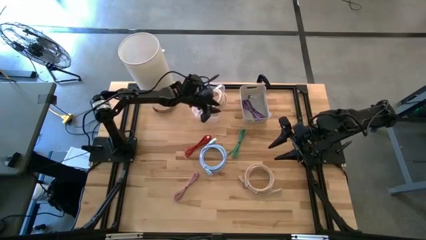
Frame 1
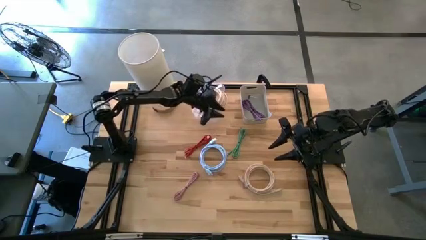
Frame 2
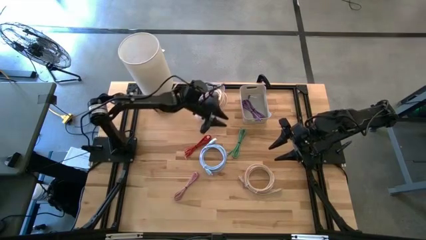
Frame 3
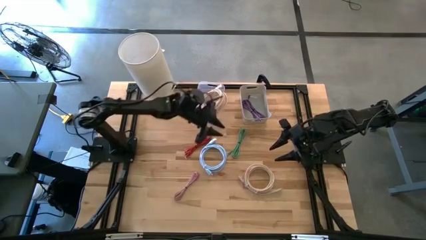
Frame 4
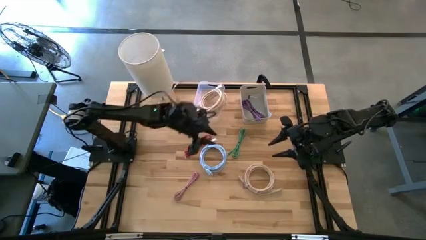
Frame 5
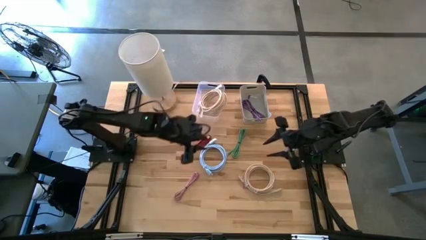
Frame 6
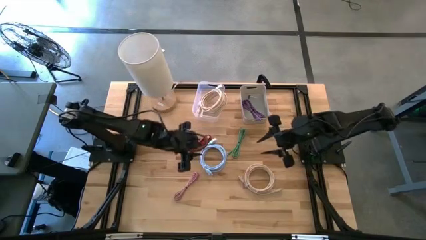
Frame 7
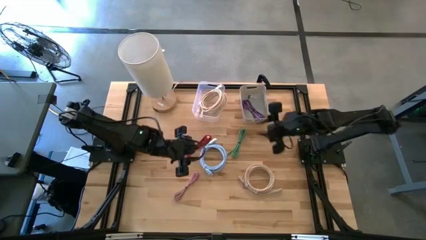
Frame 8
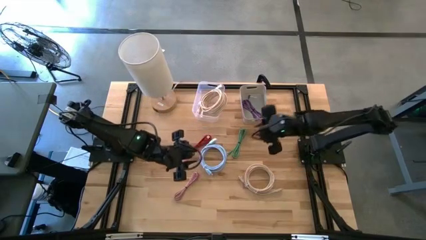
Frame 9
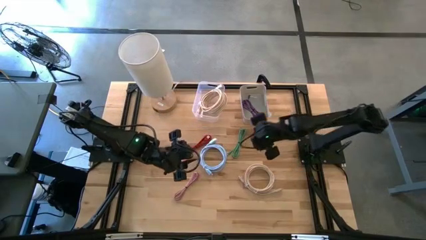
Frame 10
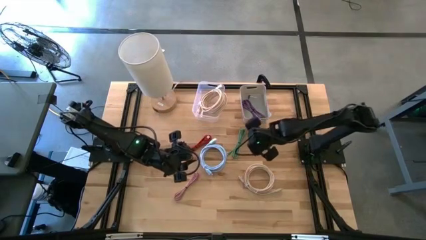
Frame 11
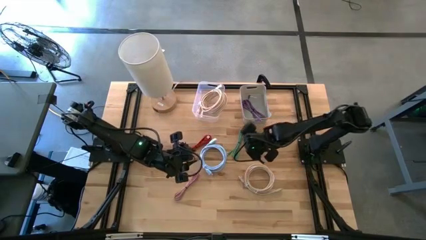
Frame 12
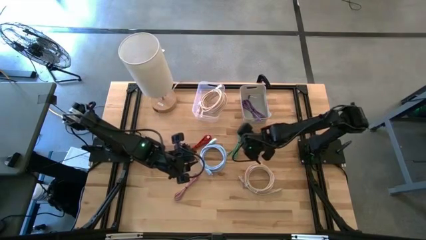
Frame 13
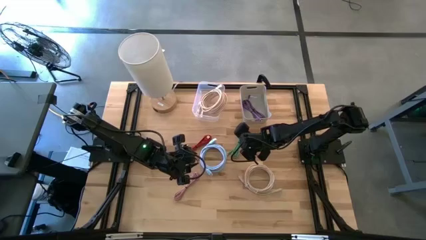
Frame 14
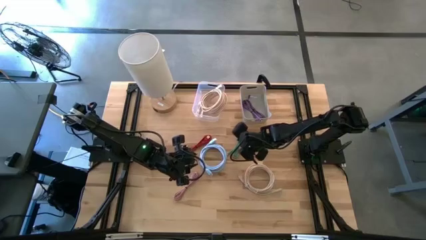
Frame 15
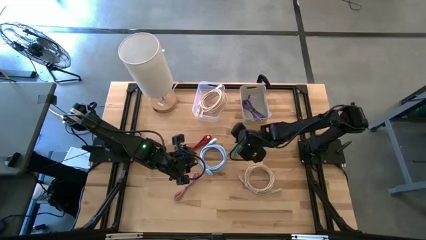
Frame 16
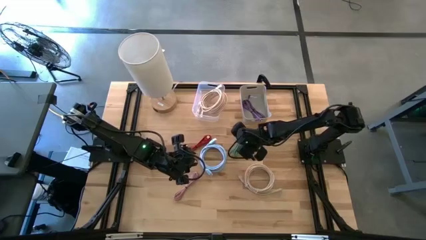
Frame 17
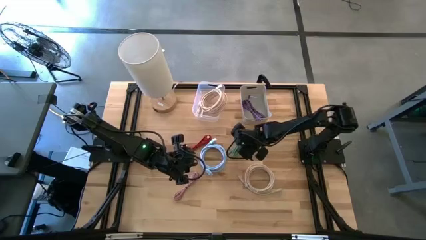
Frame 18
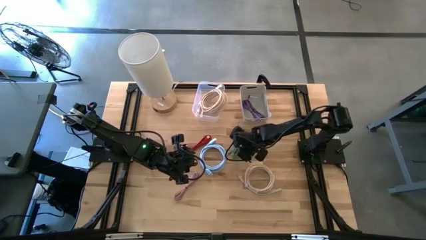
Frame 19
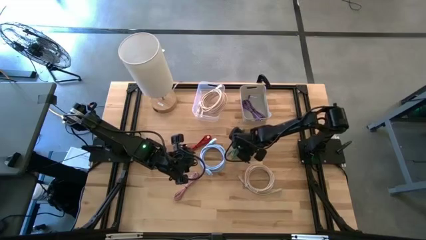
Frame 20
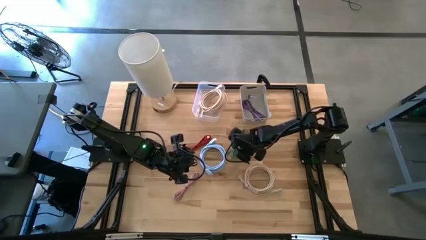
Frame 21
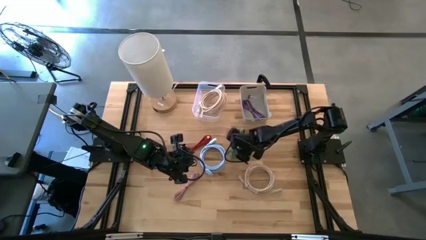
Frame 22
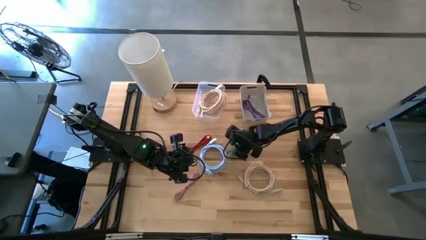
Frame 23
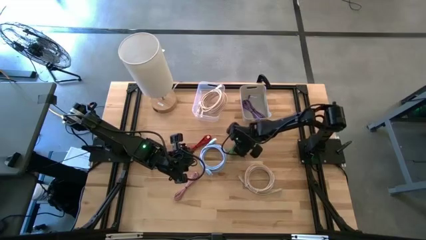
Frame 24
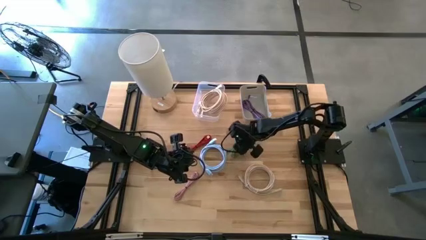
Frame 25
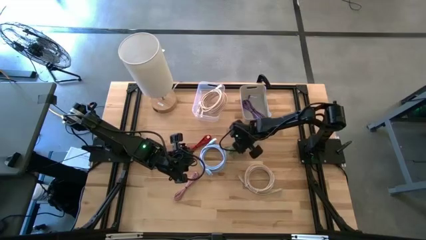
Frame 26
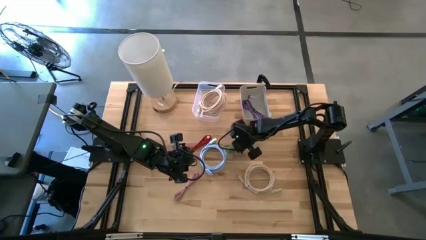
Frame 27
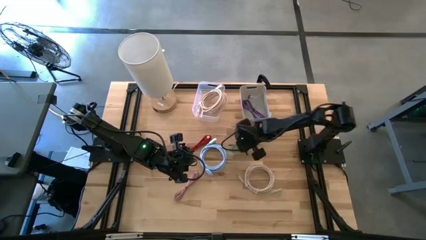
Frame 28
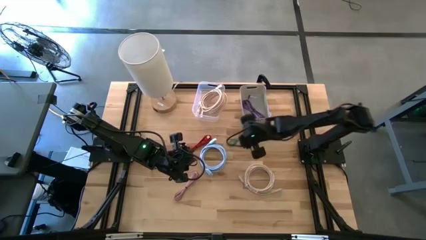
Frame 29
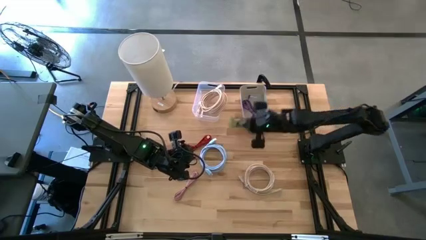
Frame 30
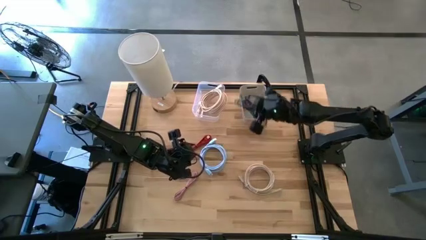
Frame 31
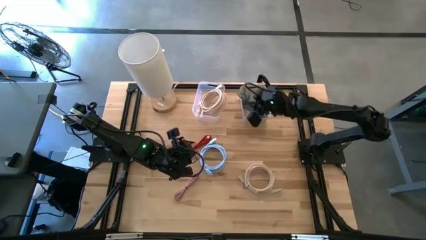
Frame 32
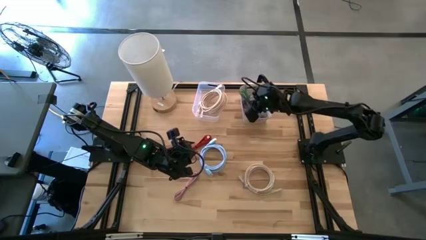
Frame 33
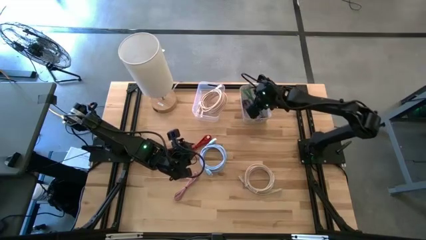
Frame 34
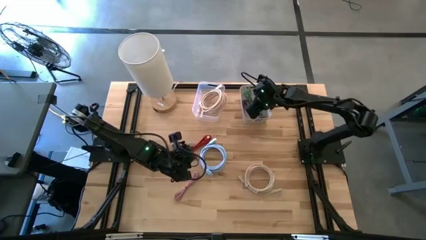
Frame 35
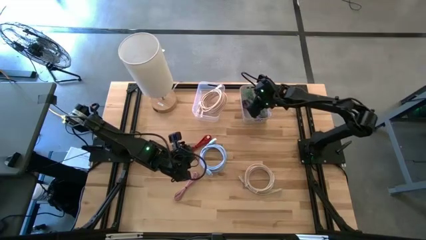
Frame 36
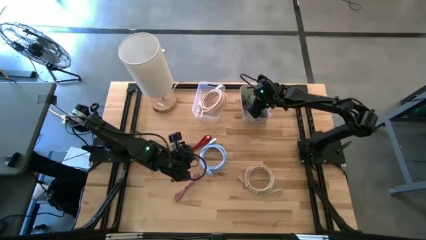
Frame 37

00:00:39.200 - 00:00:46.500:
Task: Pick & Place USB Port
Put the green charger cable into the gray bin

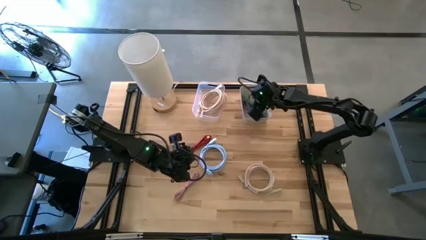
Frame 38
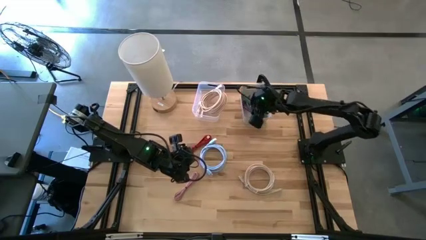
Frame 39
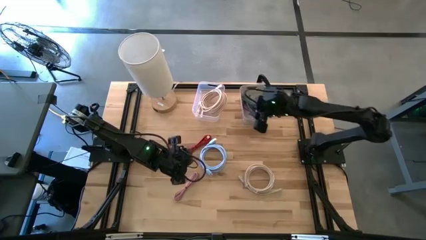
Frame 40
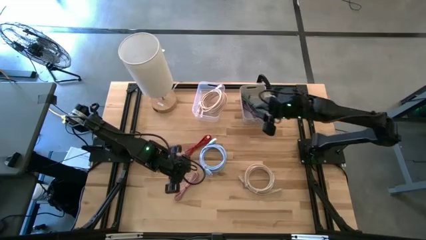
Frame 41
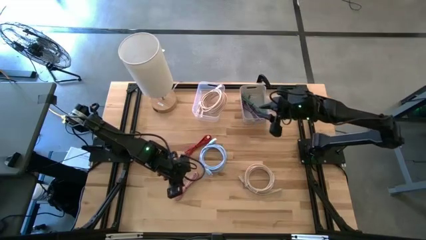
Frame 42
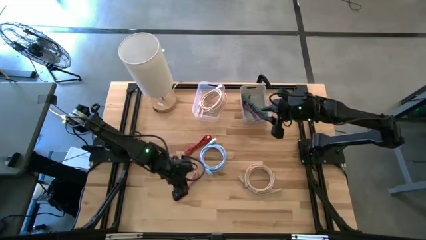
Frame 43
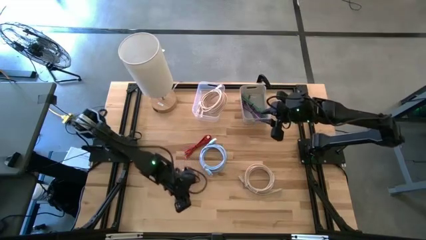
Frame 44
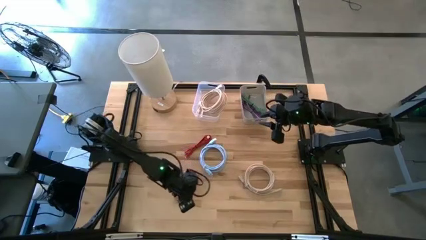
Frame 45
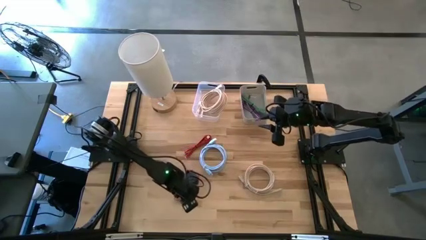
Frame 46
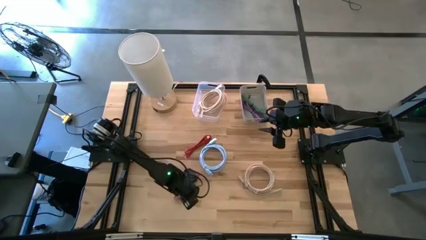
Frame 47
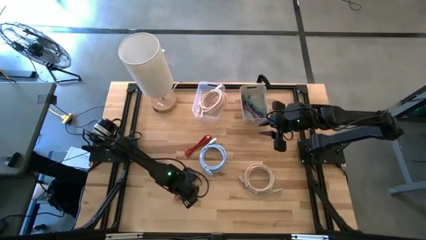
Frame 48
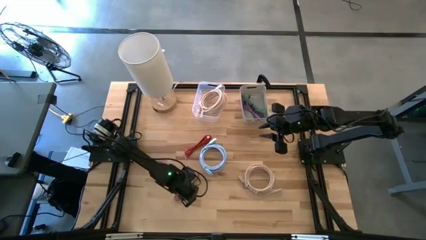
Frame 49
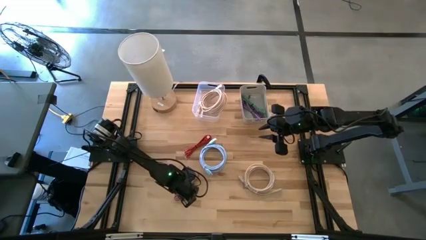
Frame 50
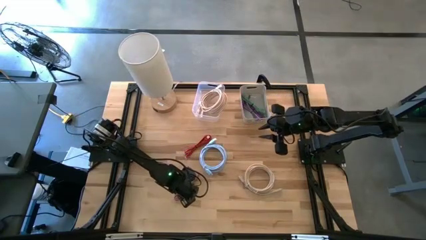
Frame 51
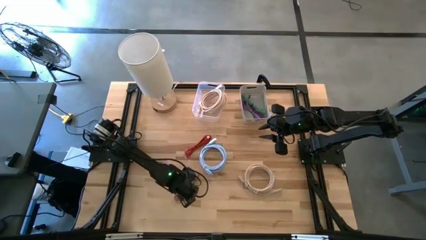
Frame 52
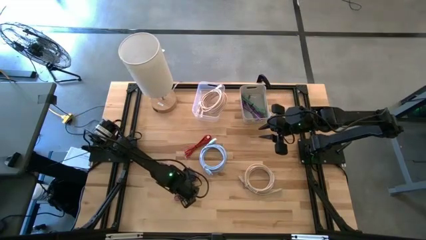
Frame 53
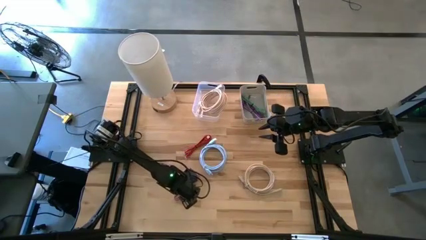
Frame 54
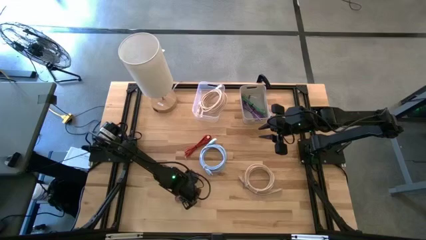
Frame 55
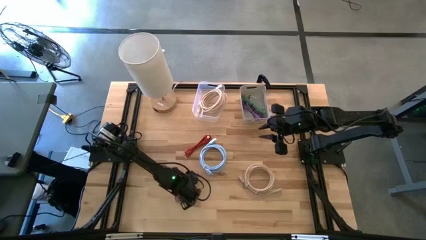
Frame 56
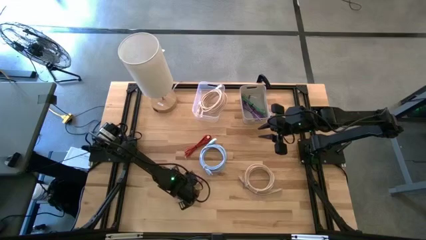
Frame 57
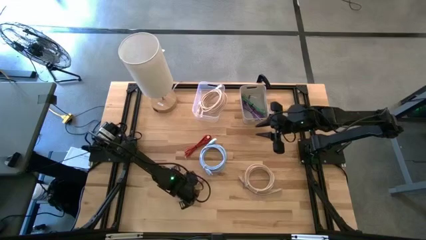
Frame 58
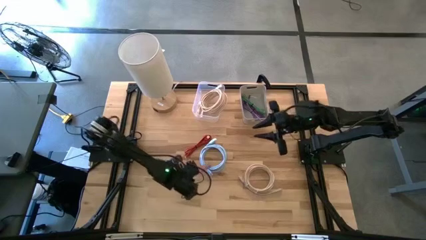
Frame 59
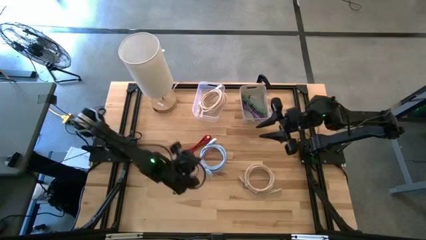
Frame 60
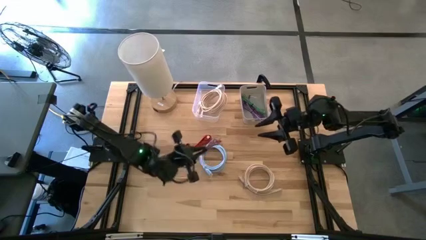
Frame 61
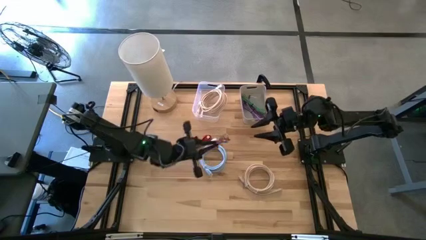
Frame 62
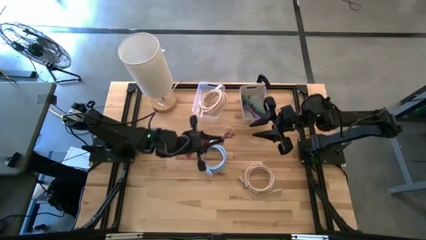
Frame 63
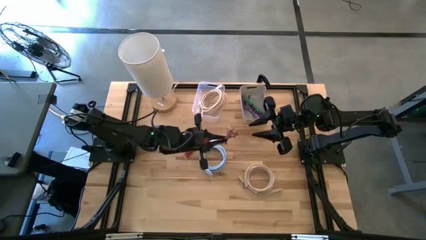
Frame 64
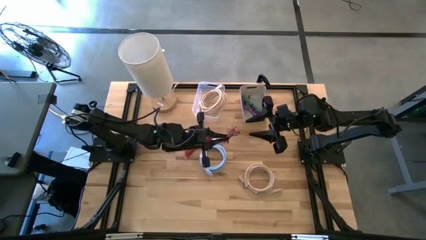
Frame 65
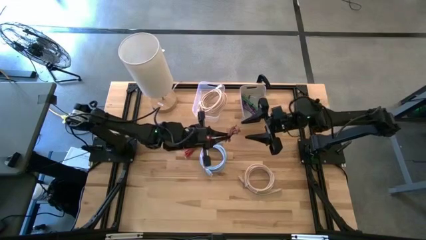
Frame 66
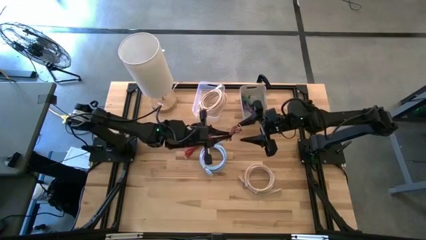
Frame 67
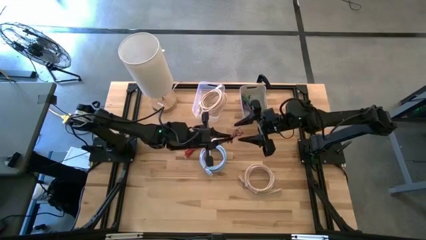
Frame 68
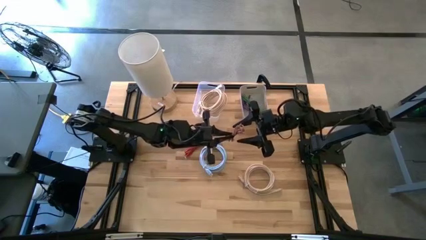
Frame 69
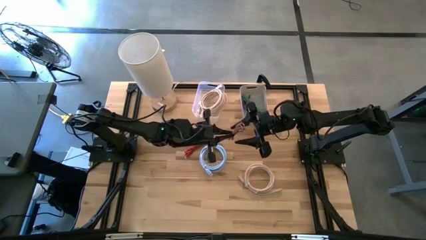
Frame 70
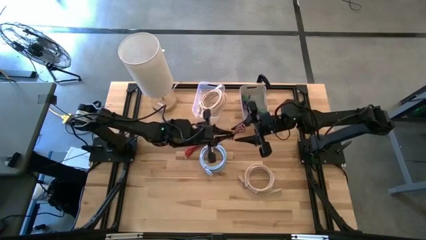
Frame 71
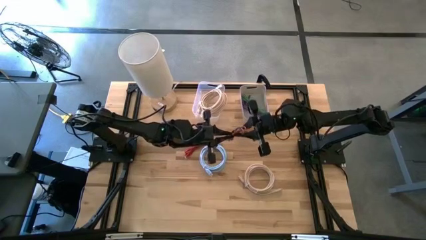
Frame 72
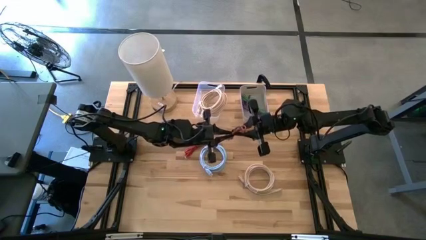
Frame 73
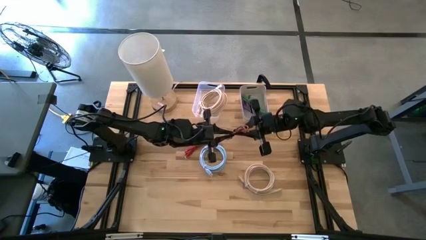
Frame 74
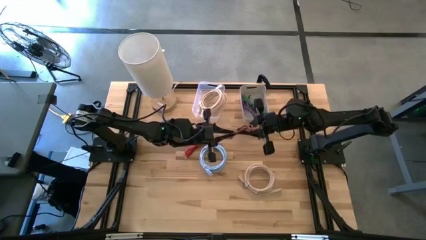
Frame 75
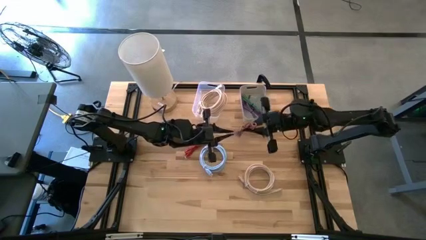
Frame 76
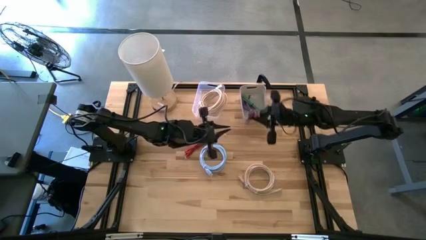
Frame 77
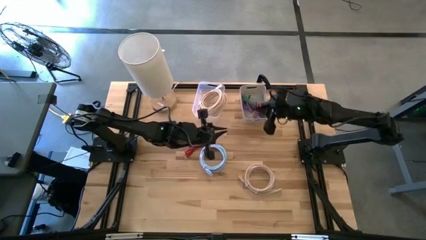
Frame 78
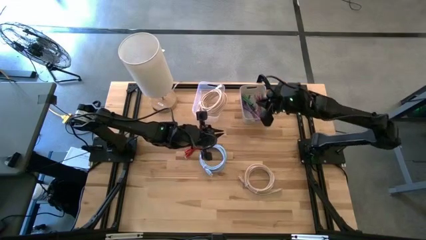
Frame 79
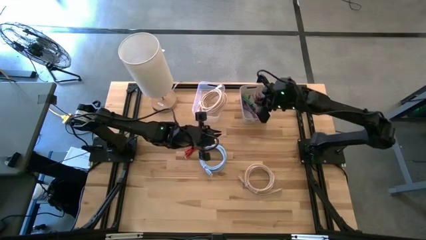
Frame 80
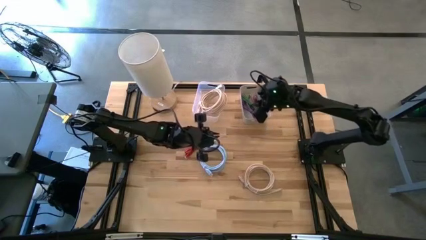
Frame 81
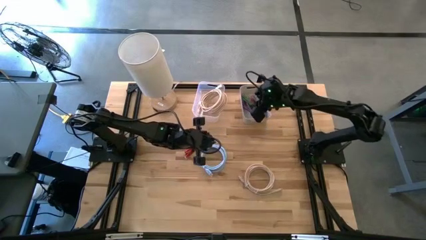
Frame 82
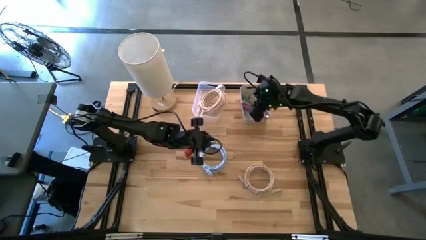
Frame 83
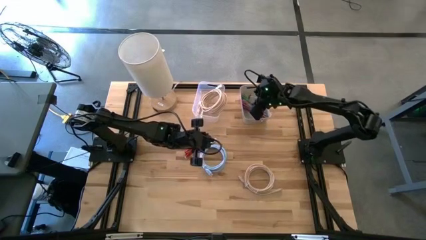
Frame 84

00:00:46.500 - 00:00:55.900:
Put the pink charger cable into the gray bin
